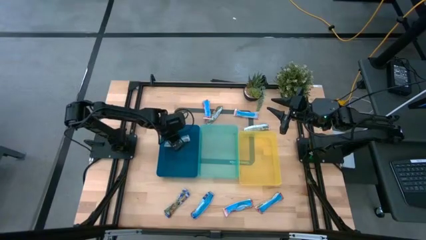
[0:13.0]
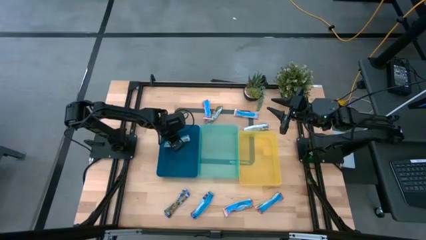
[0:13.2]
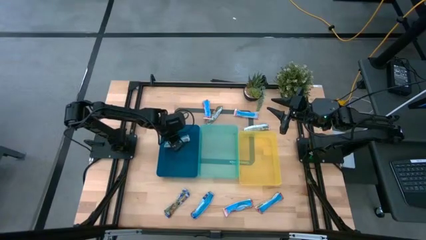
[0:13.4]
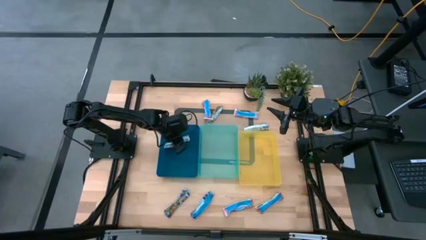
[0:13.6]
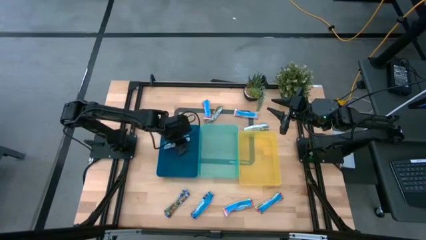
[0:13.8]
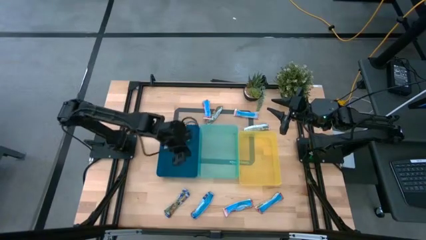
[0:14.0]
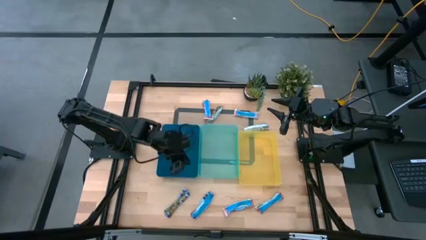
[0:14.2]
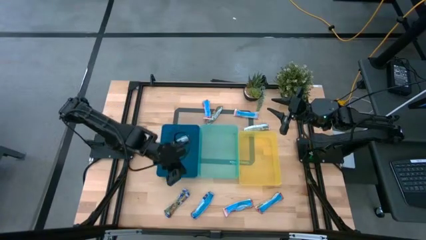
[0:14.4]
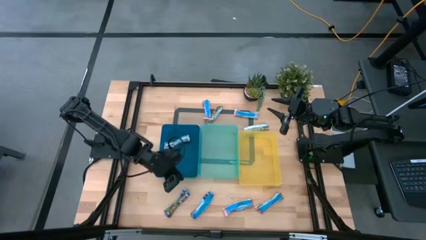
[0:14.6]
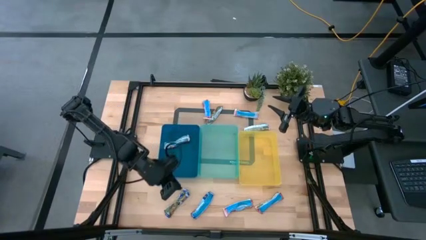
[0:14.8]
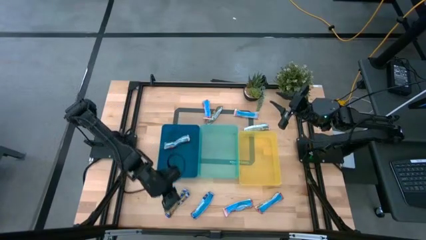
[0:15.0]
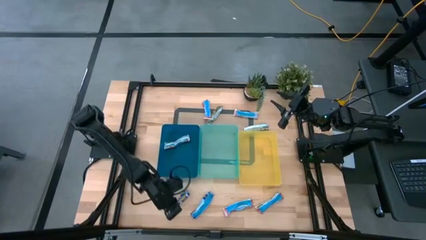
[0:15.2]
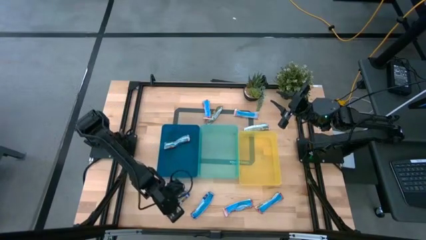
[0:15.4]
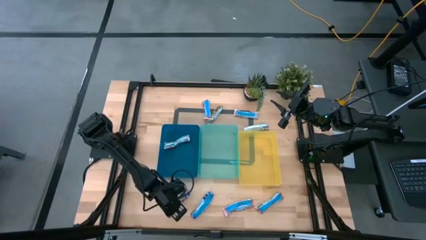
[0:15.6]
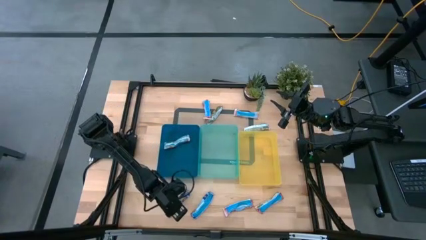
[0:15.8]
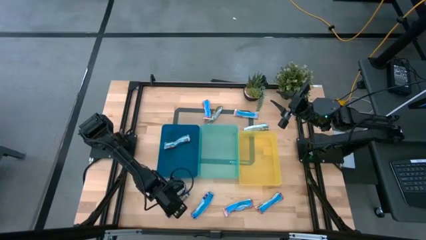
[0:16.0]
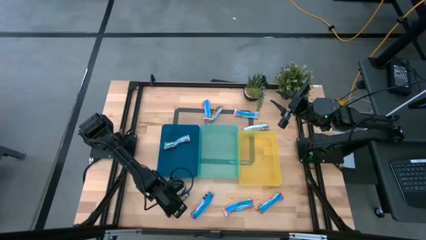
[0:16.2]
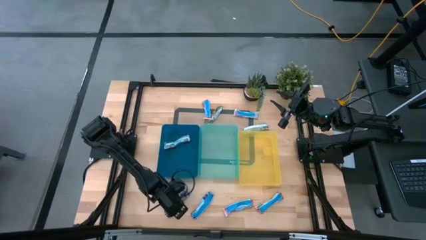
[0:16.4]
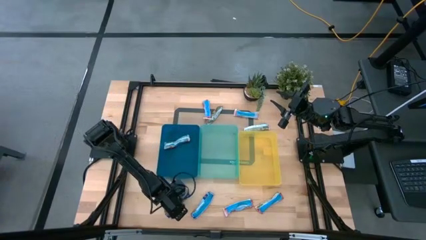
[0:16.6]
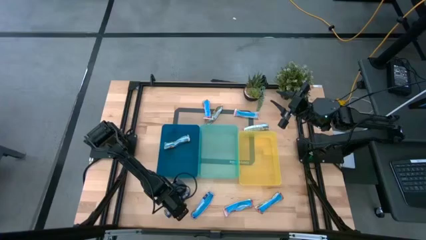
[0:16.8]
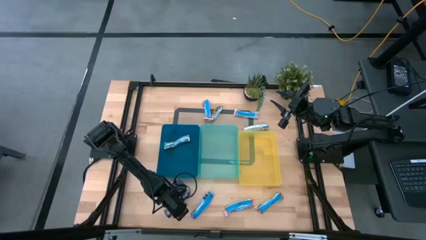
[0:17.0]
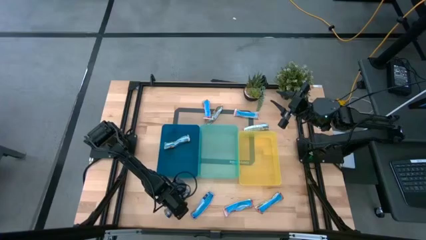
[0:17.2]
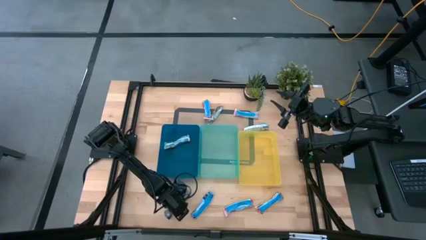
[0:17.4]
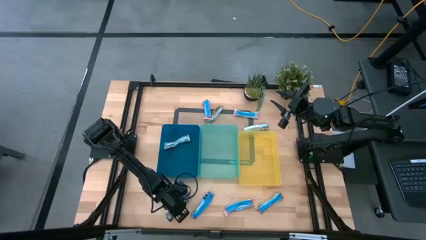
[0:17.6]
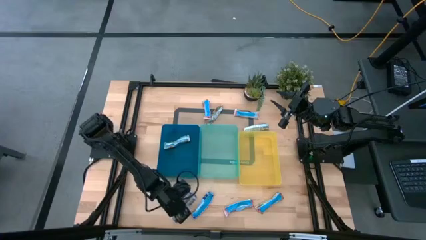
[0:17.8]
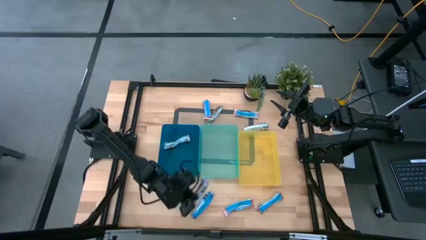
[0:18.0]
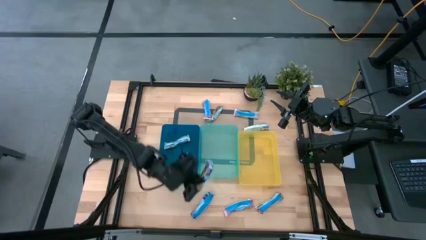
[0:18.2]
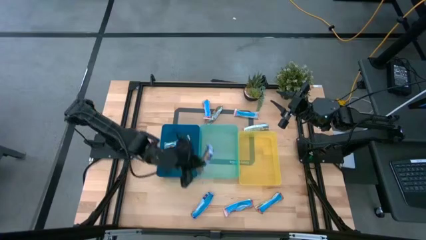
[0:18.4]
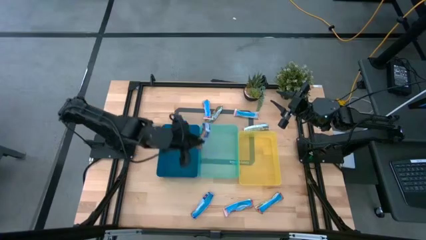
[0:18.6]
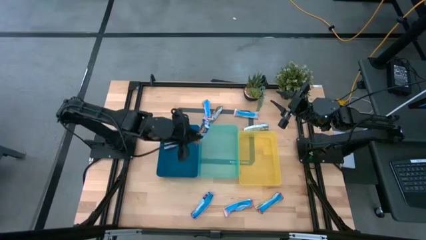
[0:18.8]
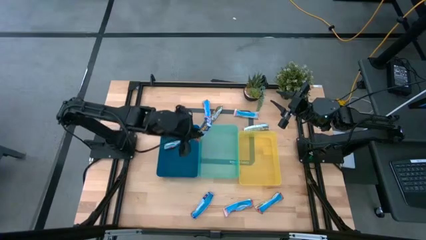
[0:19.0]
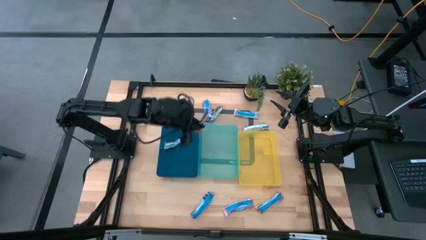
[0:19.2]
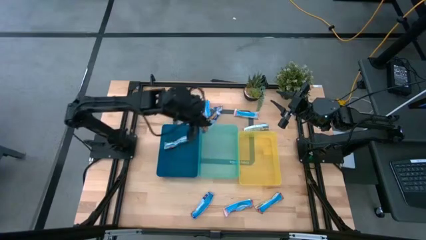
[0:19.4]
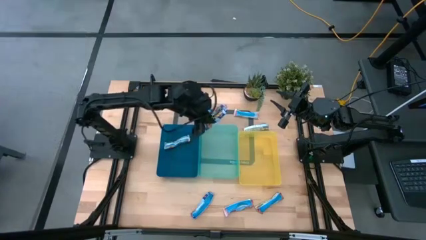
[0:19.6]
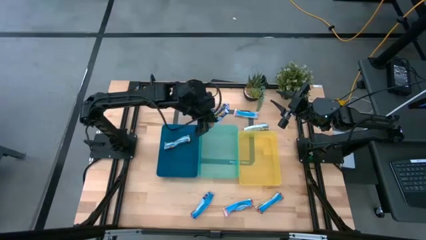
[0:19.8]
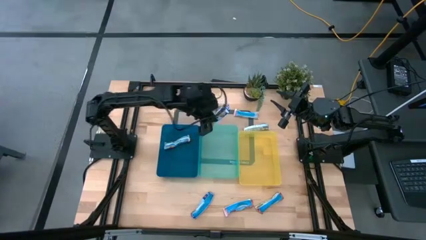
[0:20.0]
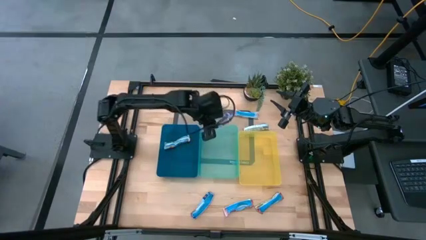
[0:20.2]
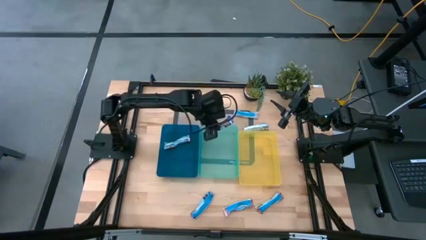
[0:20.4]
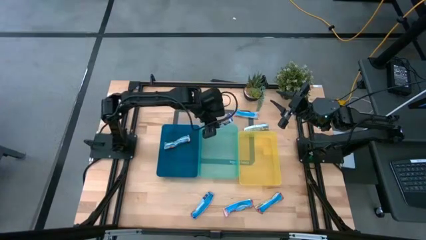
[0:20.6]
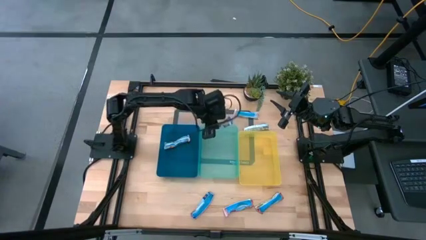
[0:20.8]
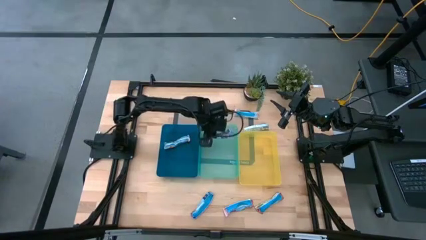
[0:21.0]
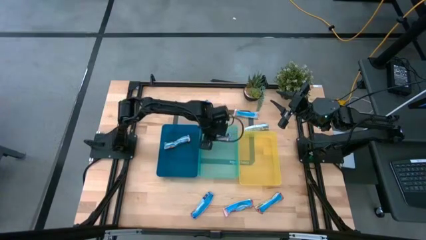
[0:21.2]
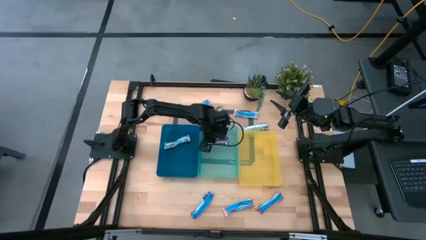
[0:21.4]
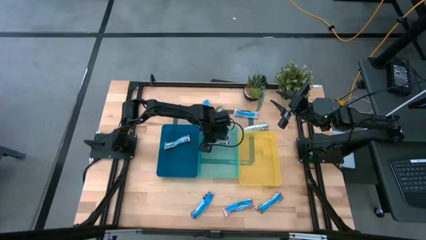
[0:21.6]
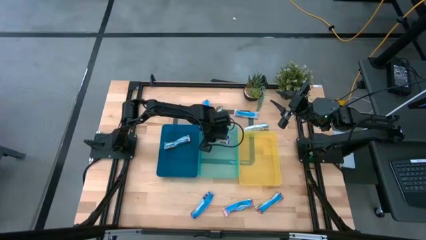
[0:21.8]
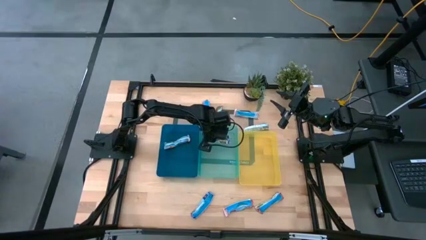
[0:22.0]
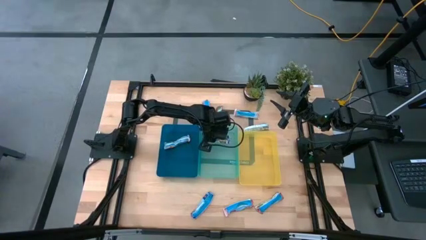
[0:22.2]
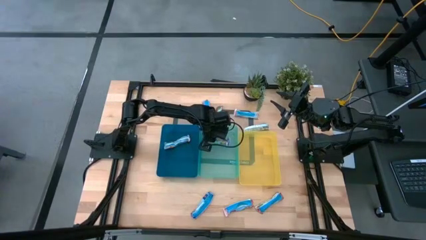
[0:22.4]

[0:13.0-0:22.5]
Task: Pick and place Granola Bars by type
Put the left blue granola bar into the green bin

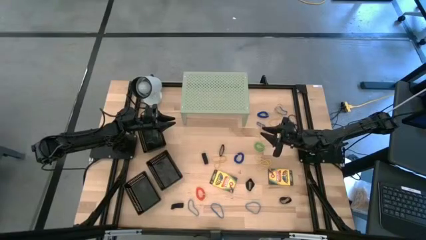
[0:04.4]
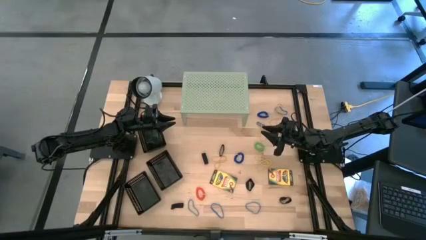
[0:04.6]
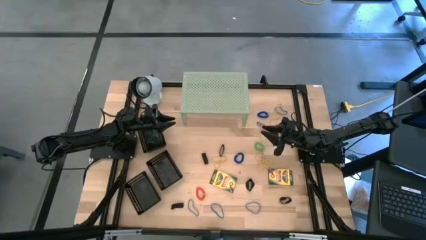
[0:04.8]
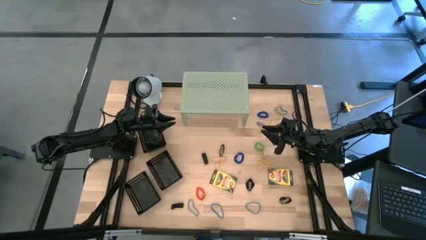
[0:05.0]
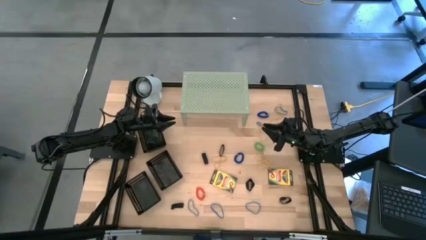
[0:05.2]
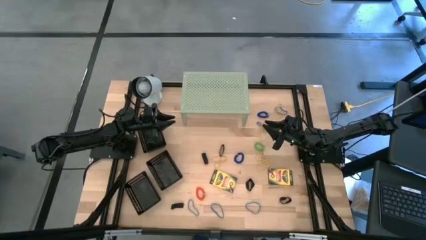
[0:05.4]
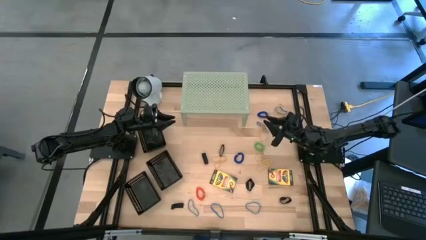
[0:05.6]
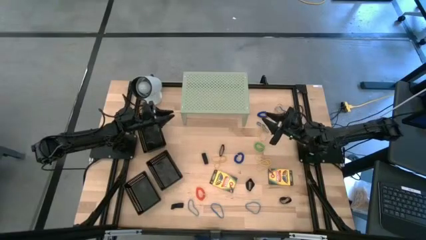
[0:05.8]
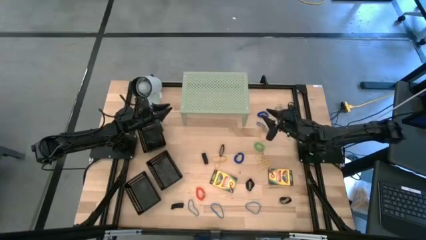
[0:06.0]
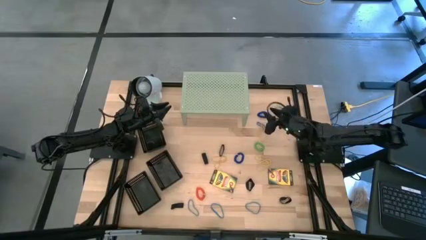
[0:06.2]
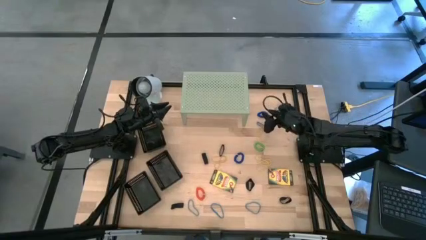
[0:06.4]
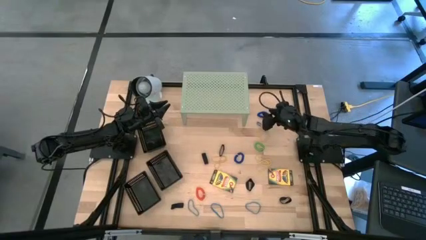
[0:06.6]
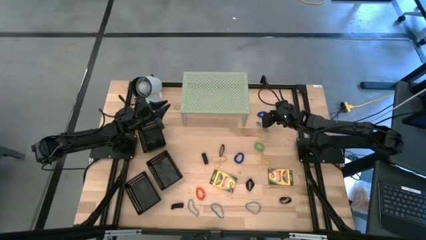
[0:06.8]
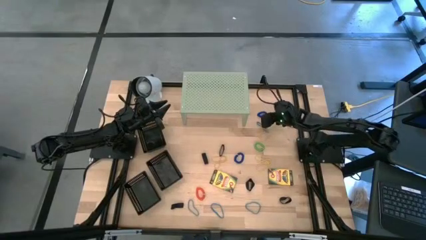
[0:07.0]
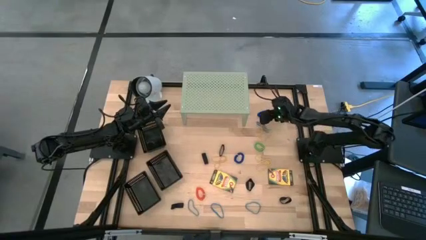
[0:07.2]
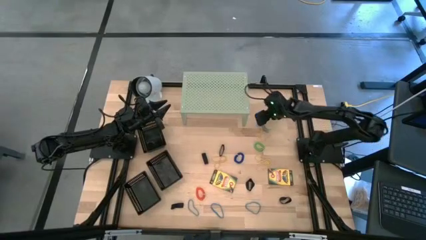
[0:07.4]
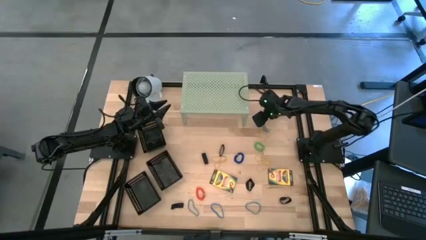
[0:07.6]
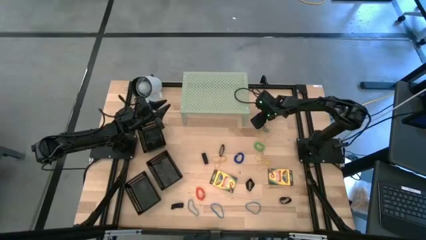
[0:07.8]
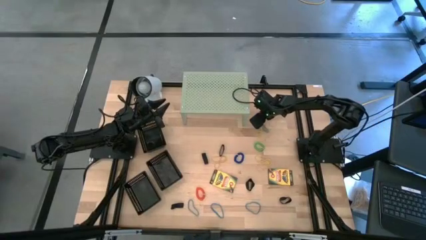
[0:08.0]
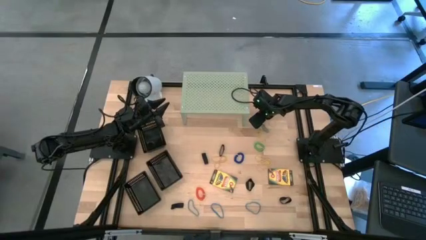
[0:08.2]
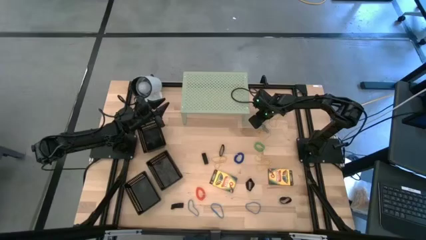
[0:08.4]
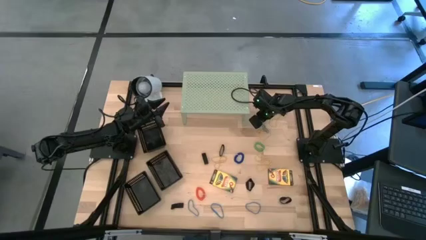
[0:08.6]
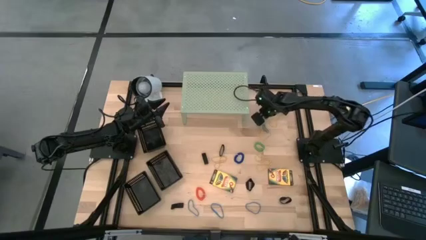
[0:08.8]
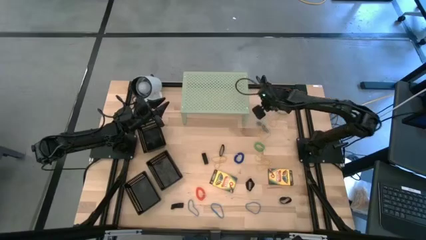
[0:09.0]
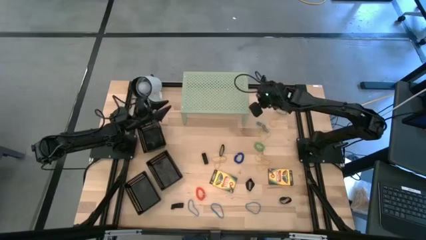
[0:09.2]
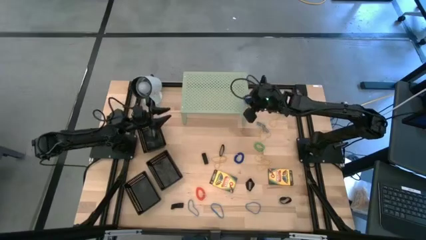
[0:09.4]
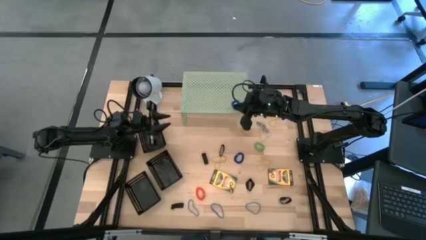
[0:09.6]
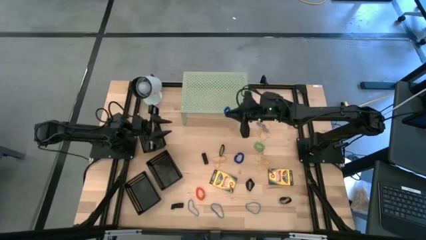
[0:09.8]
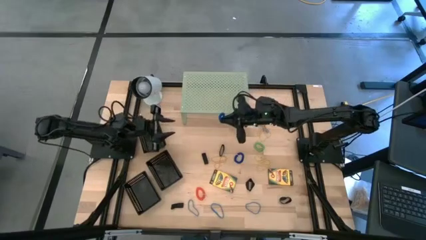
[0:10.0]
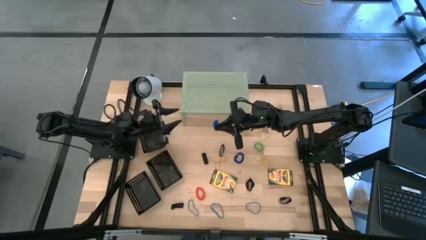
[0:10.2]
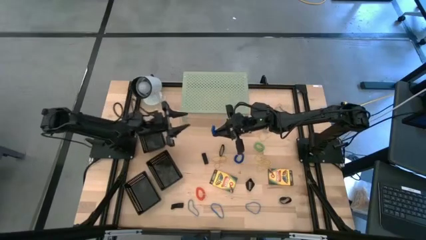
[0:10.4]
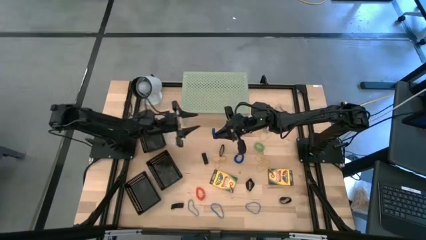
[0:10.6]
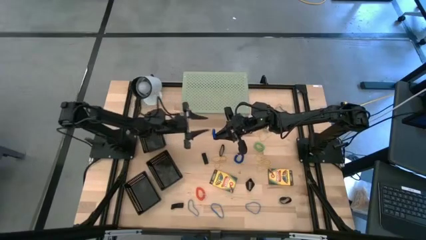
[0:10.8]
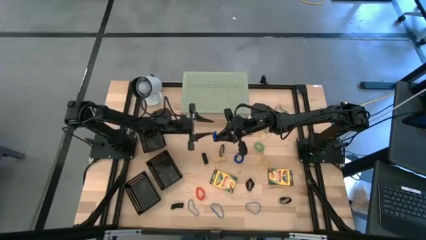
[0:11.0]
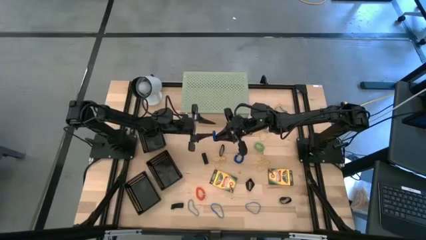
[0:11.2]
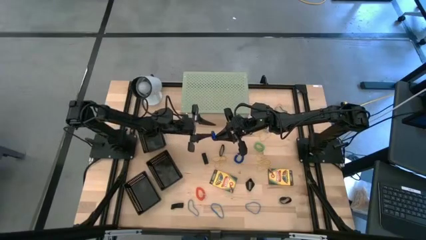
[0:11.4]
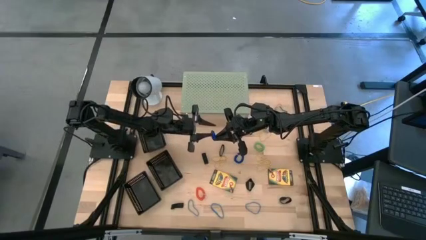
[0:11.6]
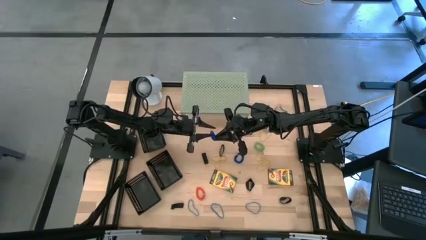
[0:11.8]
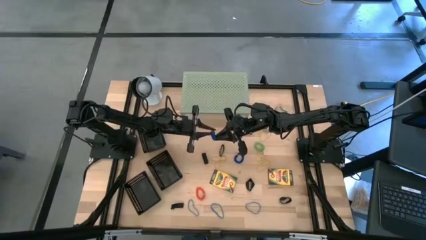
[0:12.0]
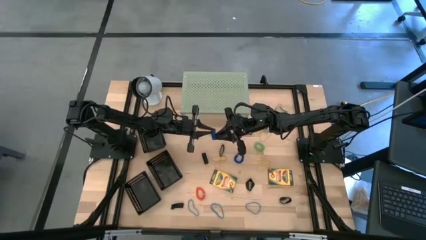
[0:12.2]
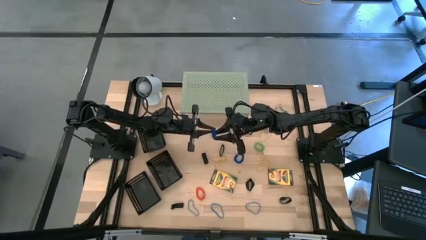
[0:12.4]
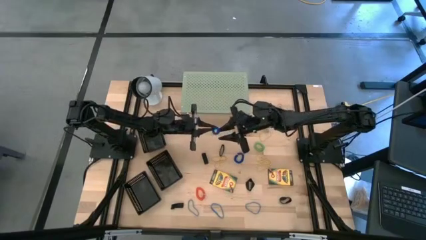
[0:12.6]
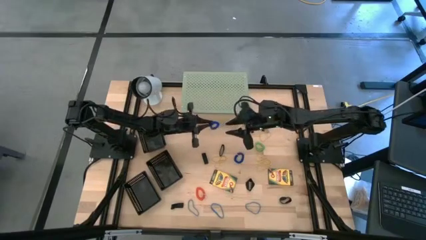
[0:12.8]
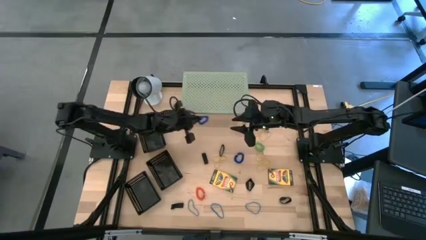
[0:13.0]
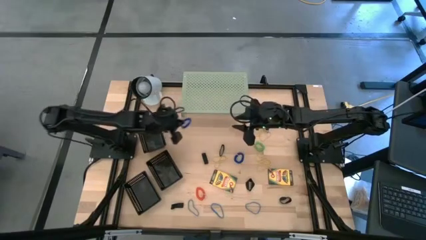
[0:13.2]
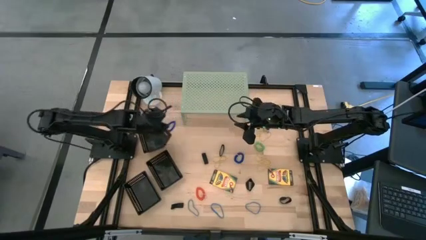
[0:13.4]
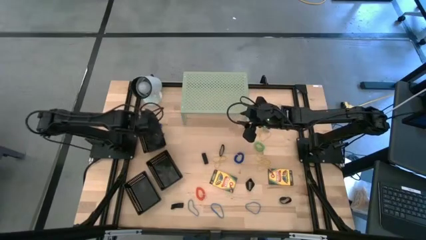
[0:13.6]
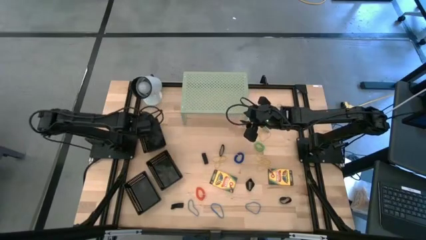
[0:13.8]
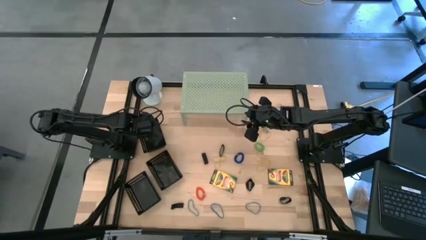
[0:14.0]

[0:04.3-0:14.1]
Task: Pick & Place Office Desk Supplies
Put the top blue spring rubber band into the top black bin
